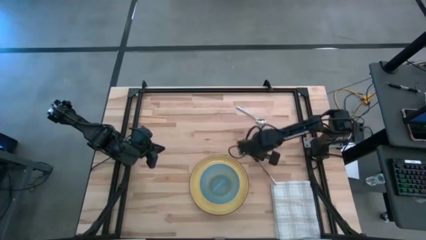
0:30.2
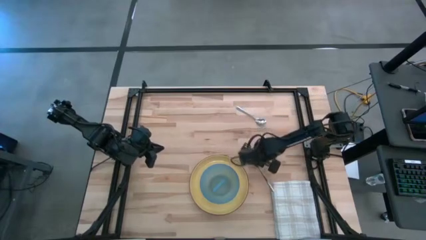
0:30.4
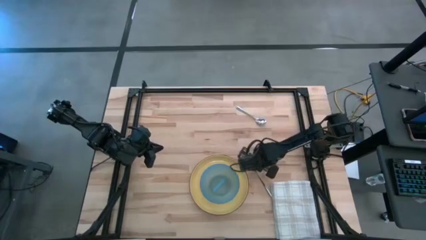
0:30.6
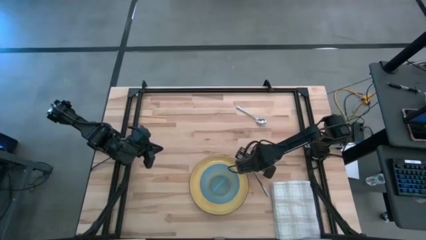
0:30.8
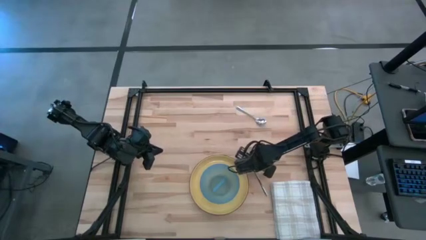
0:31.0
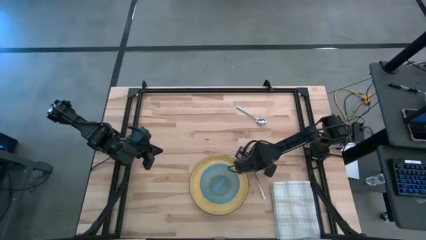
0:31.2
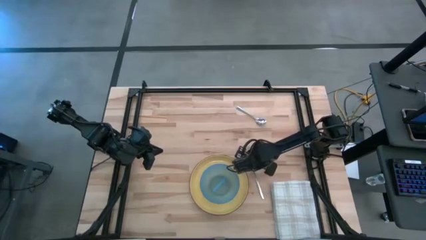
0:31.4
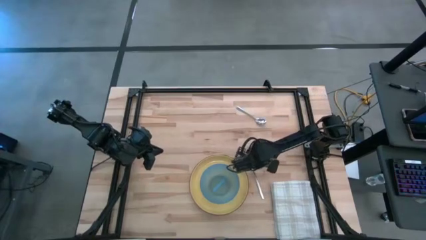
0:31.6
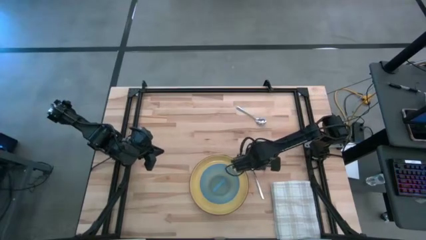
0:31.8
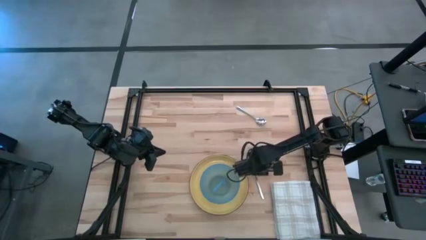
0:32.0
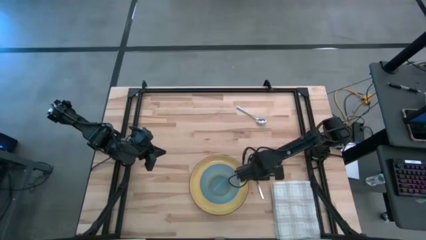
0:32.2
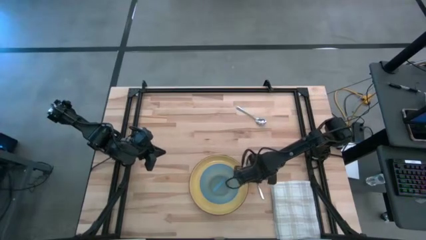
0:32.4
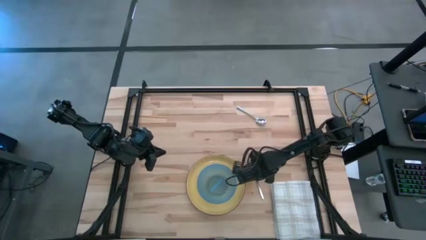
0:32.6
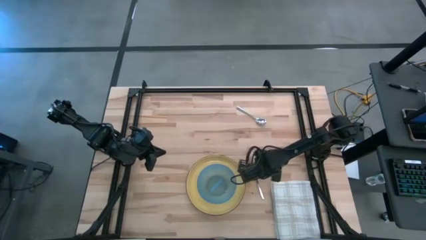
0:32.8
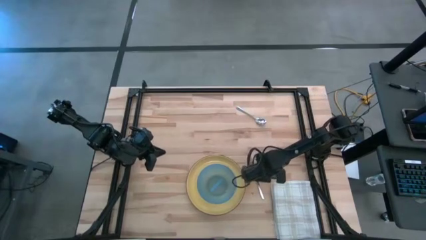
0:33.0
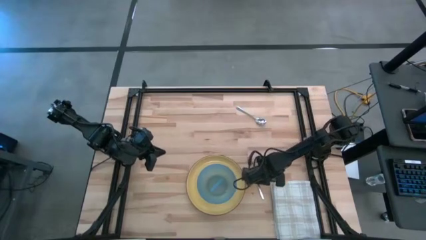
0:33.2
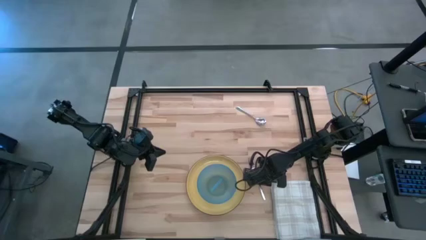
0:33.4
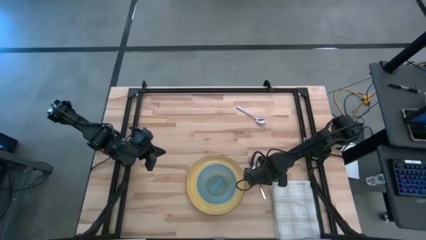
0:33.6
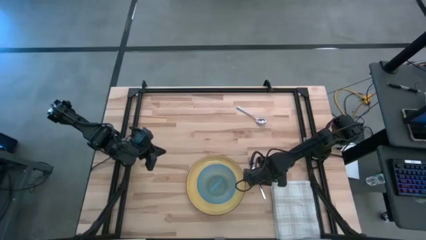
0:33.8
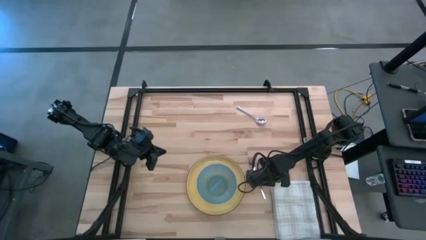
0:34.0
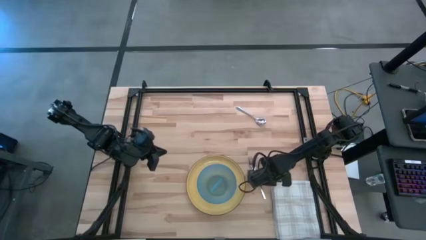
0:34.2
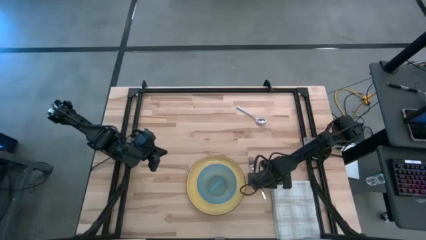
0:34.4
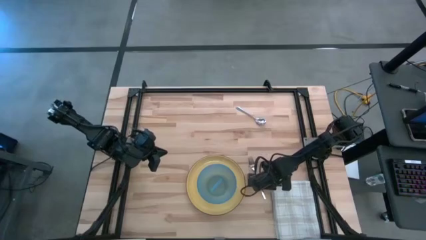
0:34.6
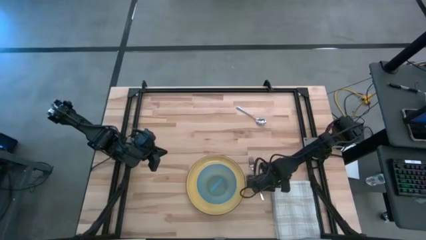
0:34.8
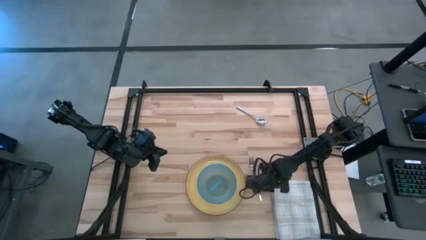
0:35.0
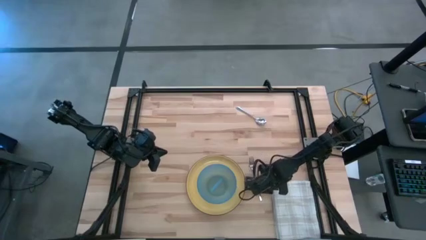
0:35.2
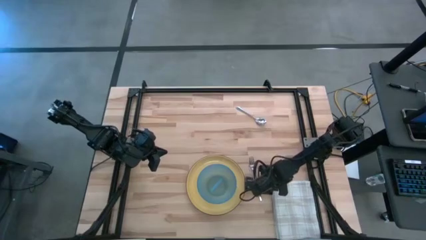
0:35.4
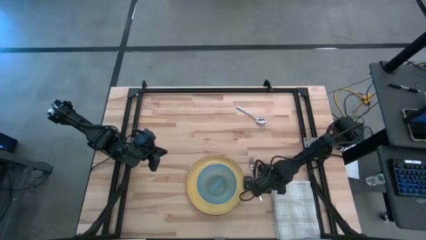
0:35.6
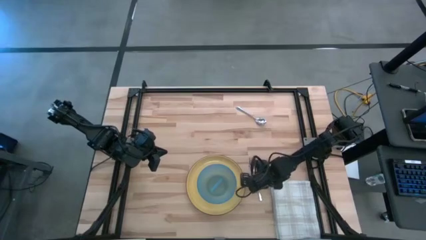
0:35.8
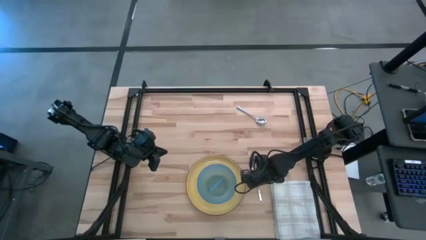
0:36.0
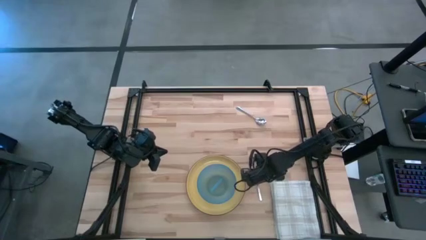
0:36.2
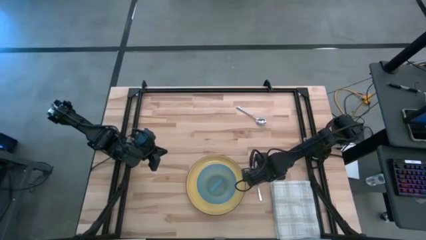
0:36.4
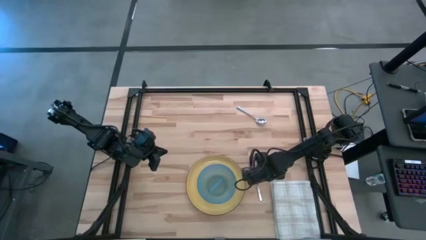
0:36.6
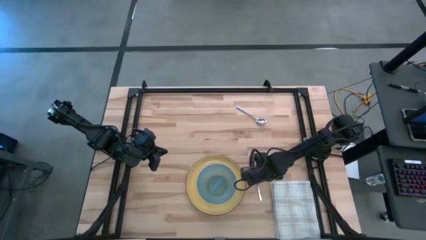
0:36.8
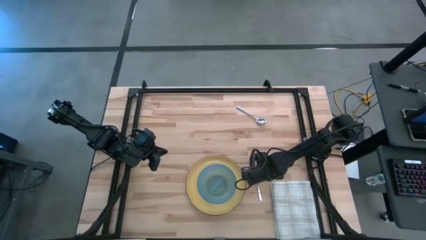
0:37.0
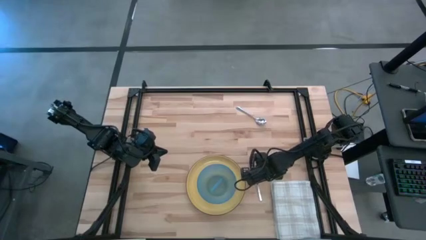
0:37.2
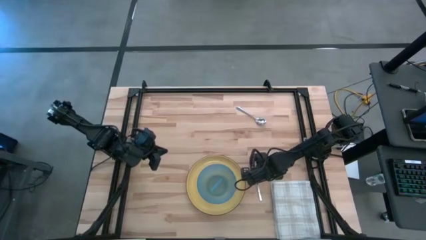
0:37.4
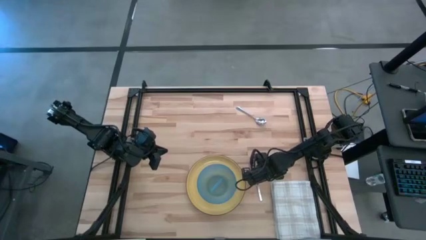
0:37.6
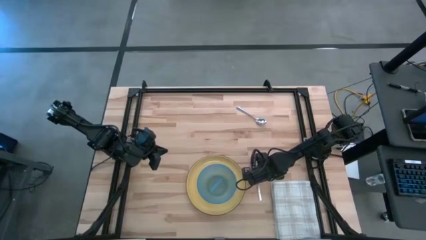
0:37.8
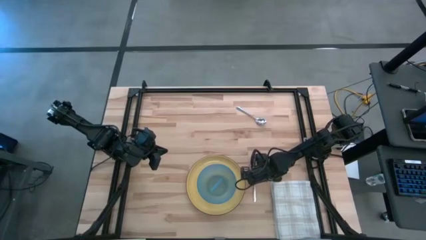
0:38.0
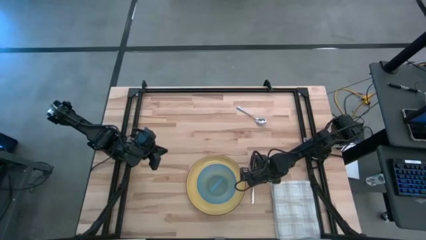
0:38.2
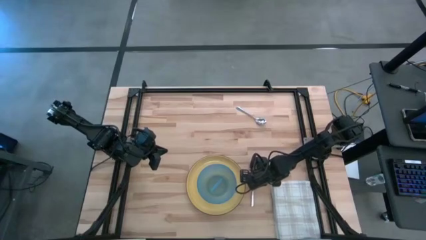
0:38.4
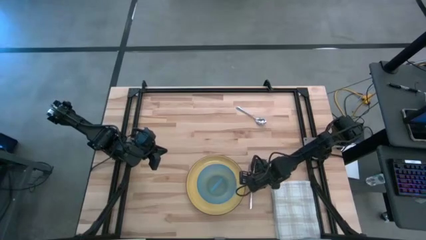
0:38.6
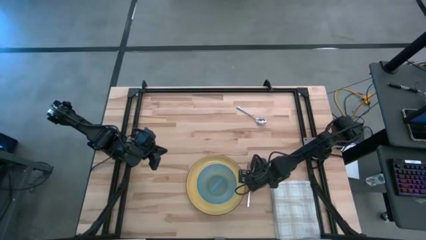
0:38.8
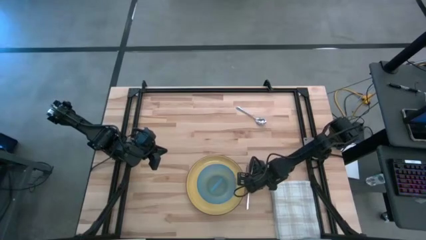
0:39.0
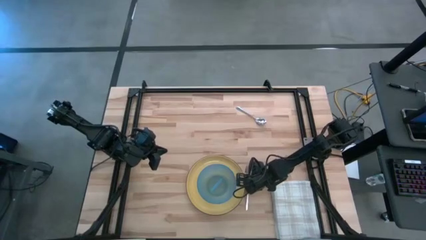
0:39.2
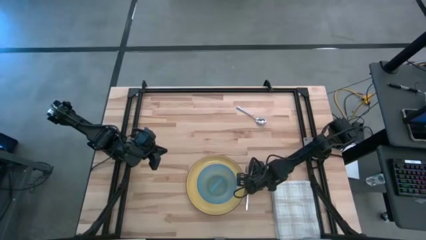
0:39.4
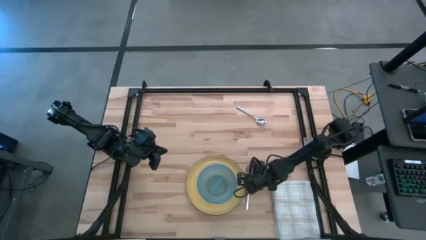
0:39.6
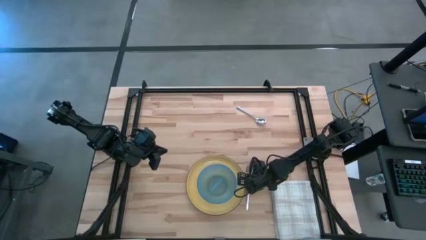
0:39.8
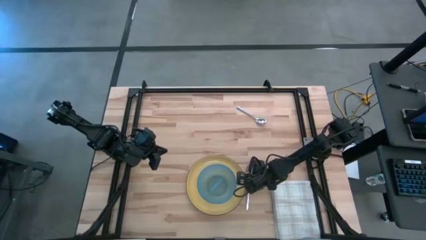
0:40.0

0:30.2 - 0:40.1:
Task: Set table place
Move the silver fork to the right side of the yellow plate on the table

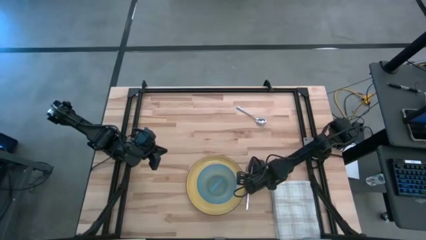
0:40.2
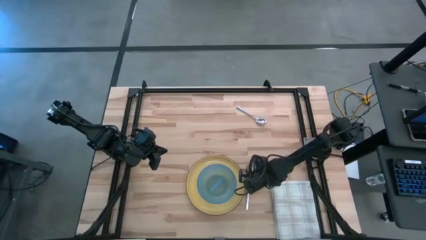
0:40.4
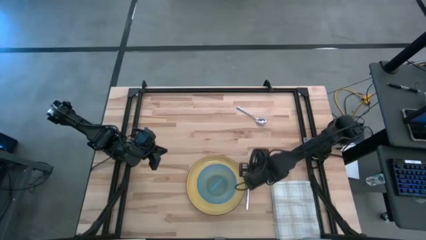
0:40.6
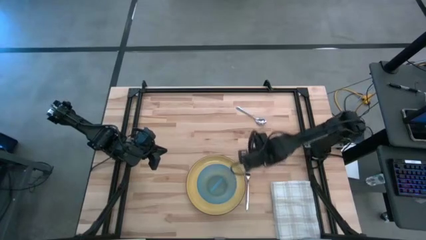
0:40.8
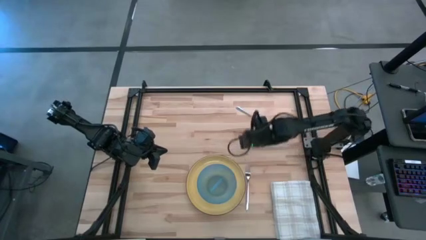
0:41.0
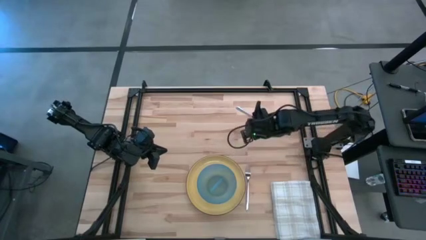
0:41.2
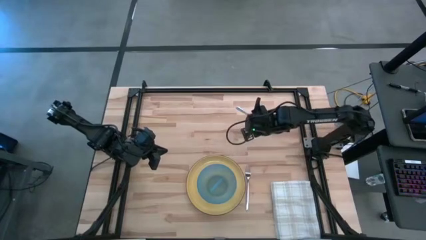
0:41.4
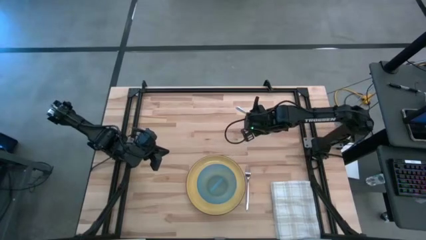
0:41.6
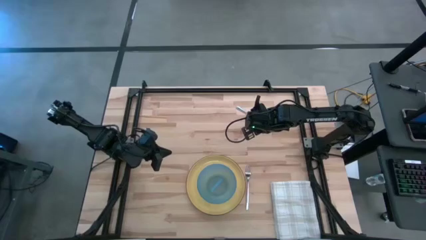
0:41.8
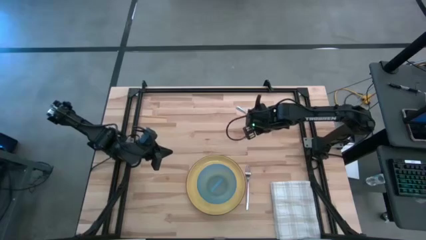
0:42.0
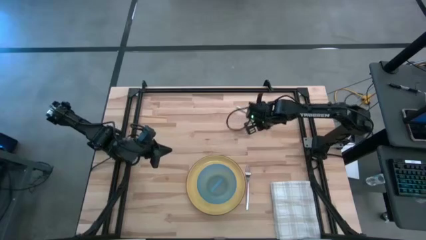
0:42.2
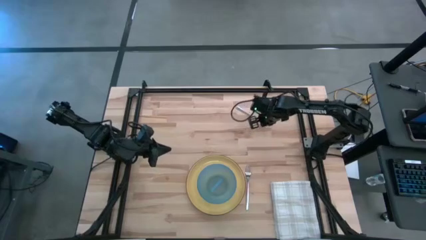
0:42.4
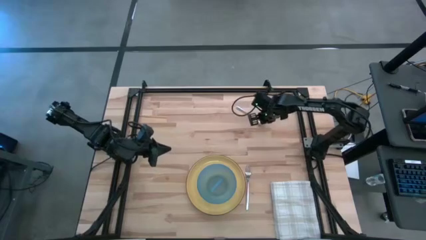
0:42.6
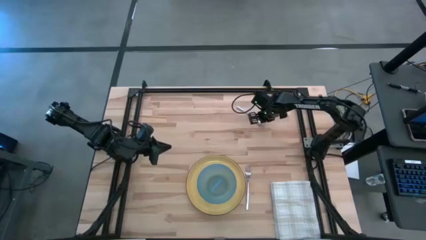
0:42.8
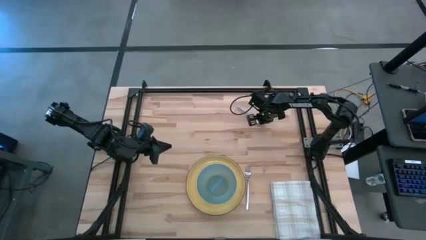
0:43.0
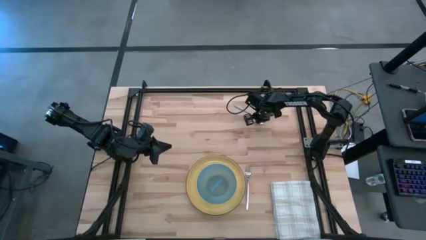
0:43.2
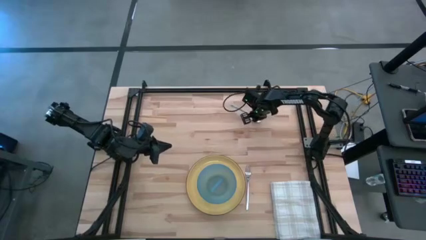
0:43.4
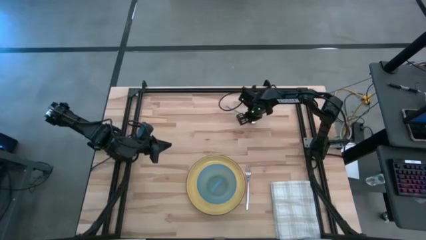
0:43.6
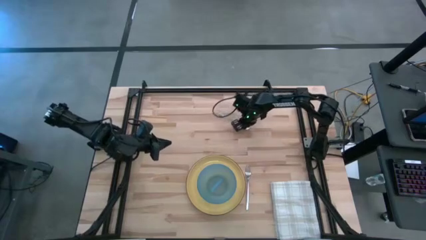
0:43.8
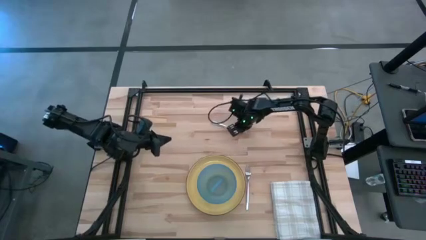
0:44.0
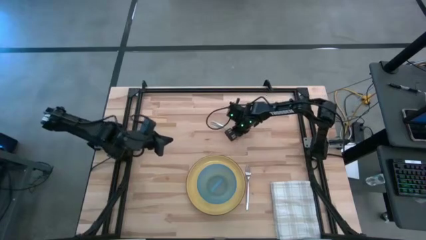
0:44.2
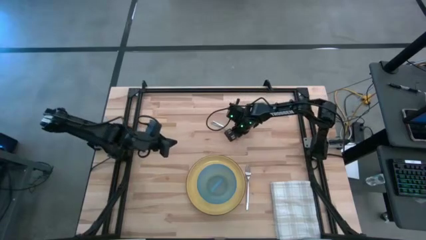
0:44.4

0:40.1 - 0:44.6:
Put the silver spoon into the blue bowl
